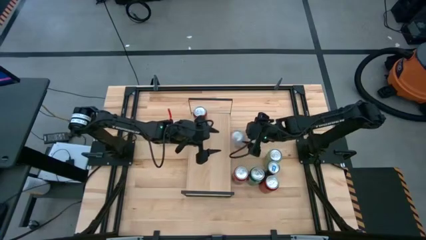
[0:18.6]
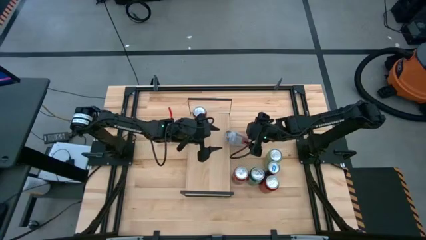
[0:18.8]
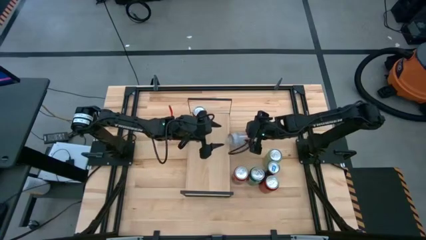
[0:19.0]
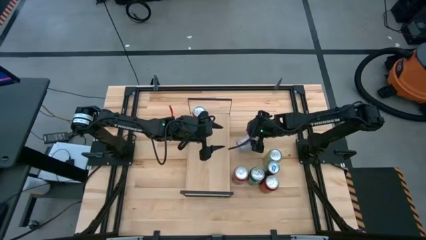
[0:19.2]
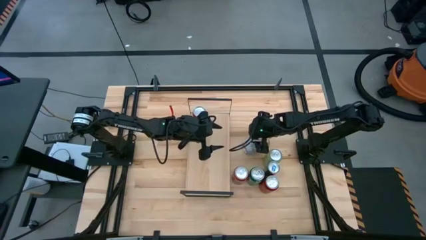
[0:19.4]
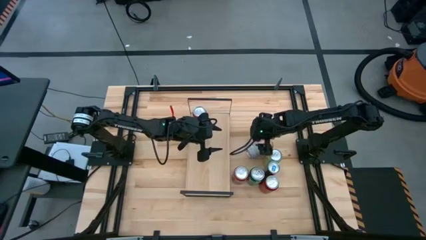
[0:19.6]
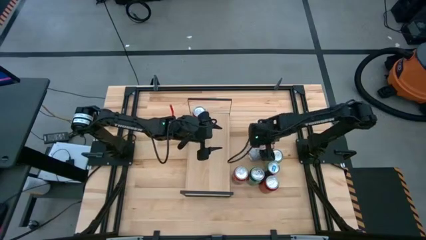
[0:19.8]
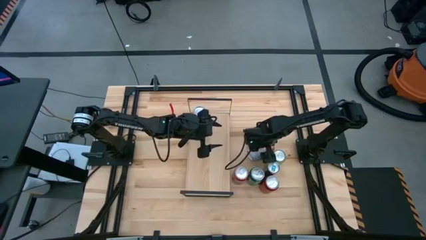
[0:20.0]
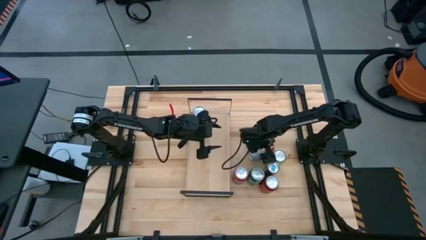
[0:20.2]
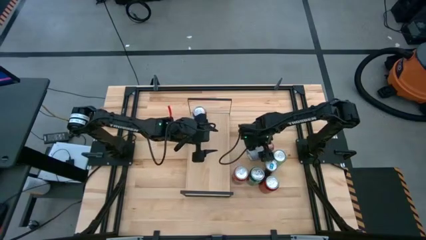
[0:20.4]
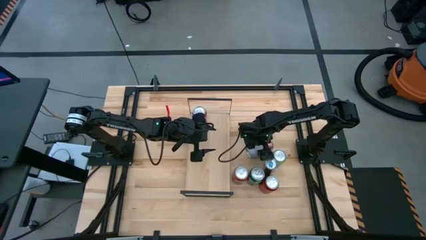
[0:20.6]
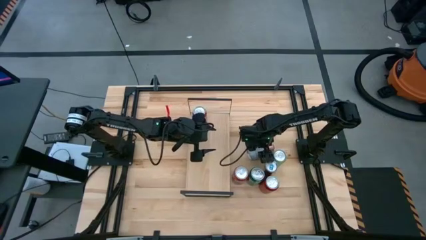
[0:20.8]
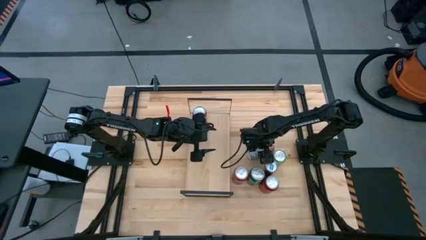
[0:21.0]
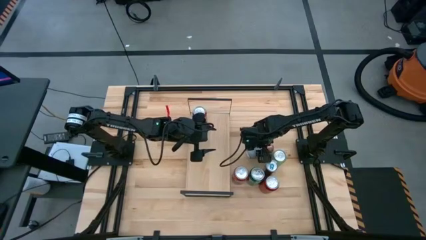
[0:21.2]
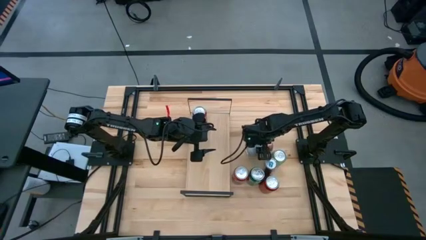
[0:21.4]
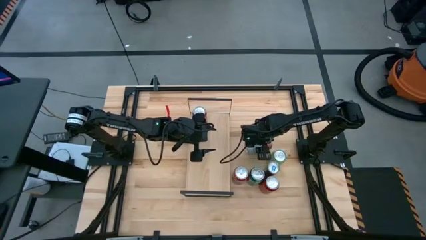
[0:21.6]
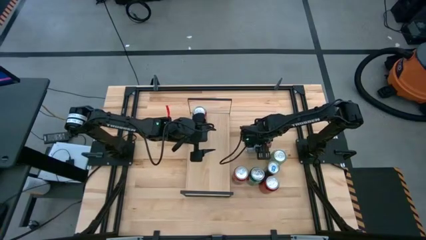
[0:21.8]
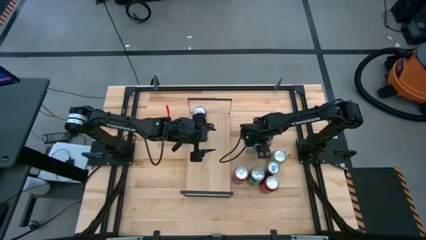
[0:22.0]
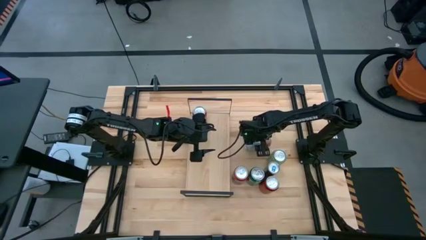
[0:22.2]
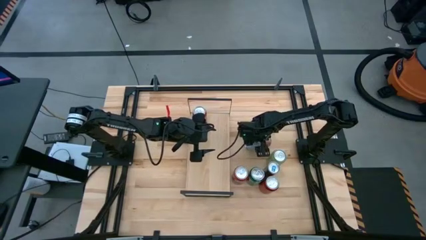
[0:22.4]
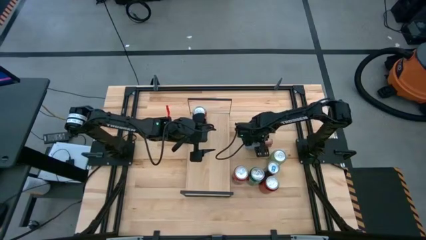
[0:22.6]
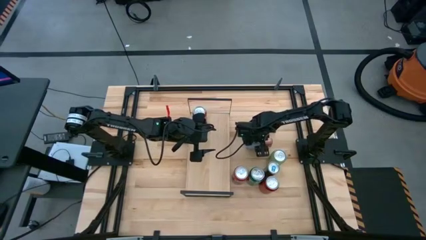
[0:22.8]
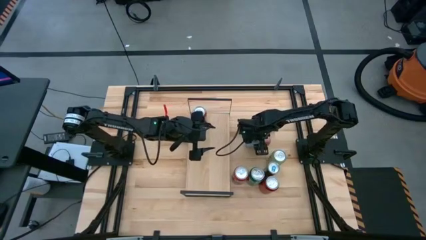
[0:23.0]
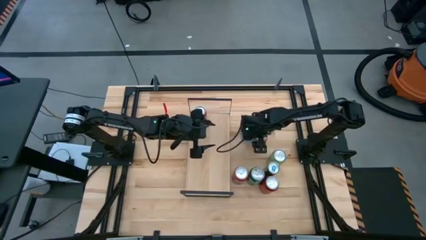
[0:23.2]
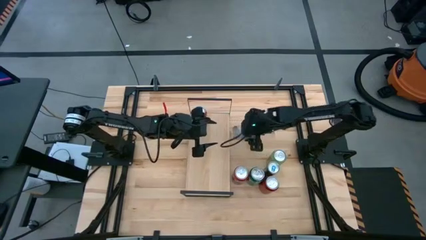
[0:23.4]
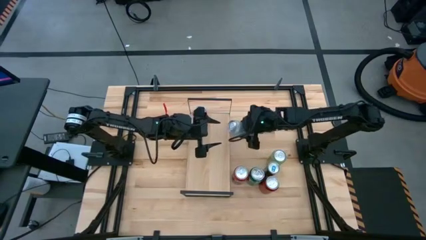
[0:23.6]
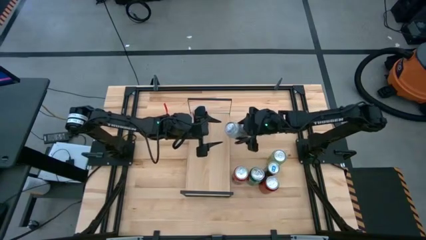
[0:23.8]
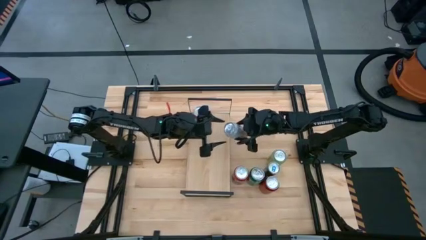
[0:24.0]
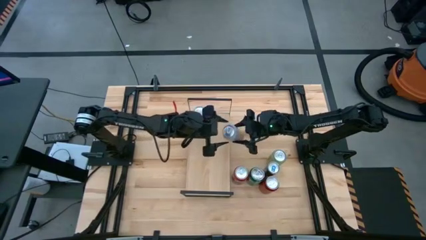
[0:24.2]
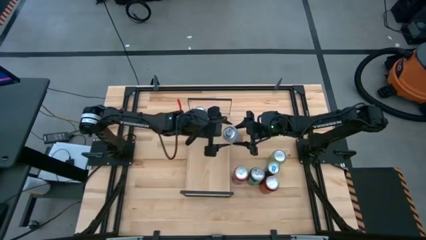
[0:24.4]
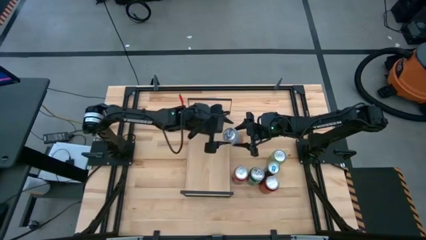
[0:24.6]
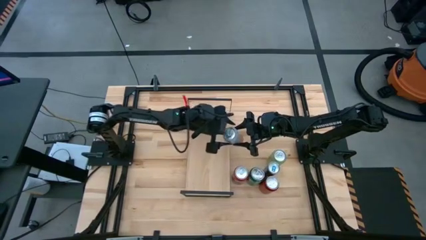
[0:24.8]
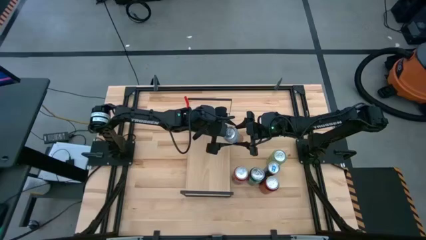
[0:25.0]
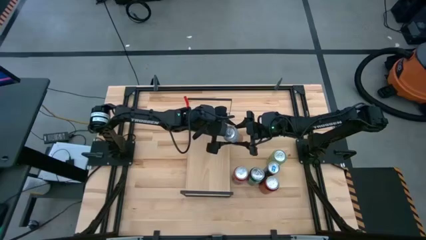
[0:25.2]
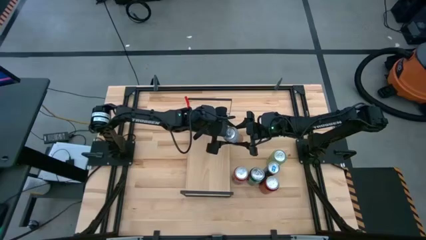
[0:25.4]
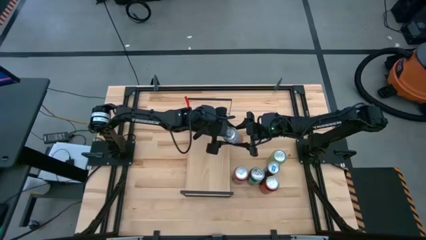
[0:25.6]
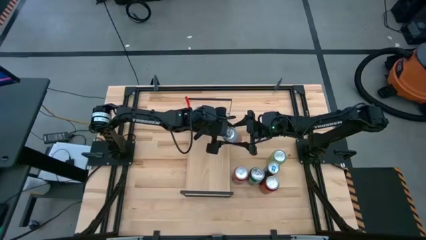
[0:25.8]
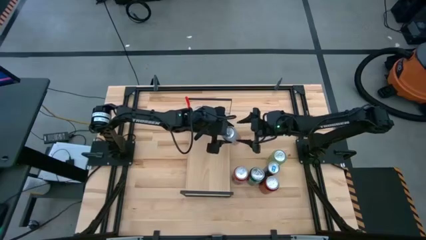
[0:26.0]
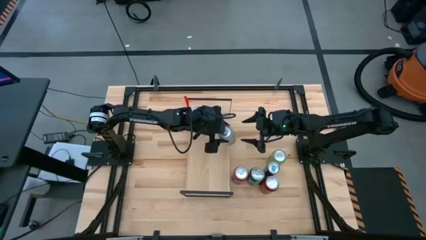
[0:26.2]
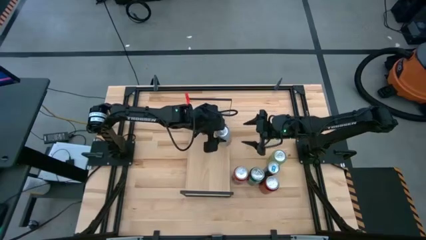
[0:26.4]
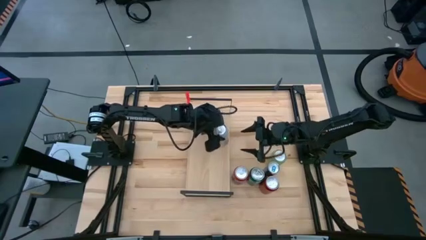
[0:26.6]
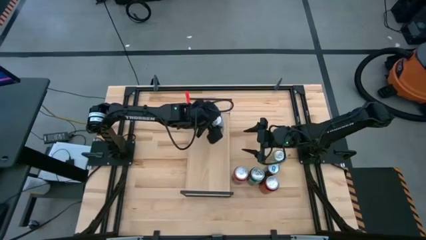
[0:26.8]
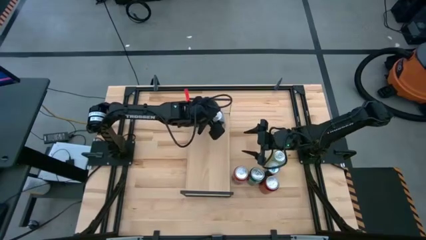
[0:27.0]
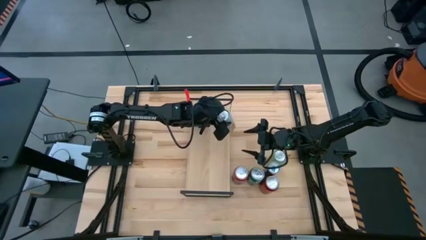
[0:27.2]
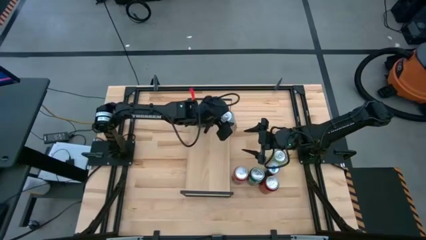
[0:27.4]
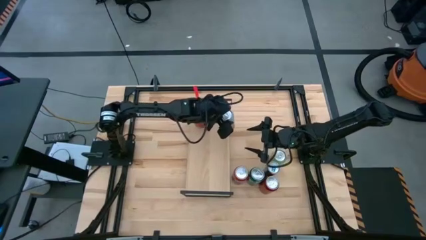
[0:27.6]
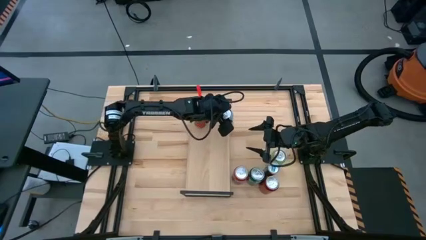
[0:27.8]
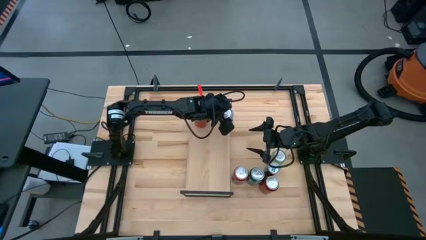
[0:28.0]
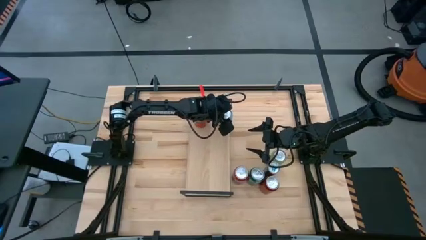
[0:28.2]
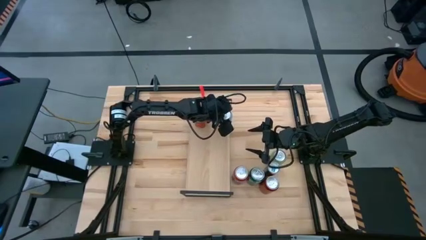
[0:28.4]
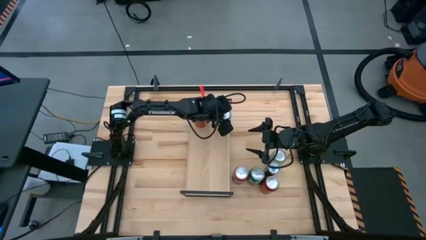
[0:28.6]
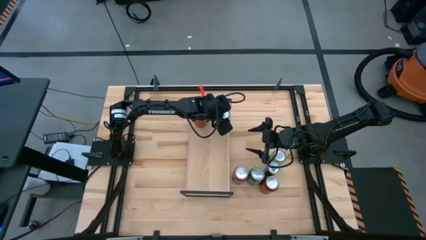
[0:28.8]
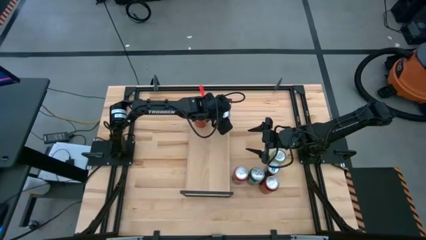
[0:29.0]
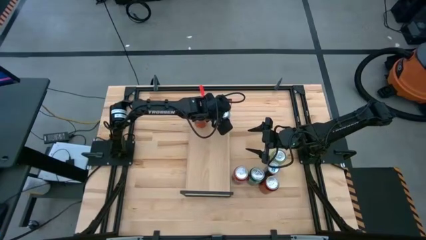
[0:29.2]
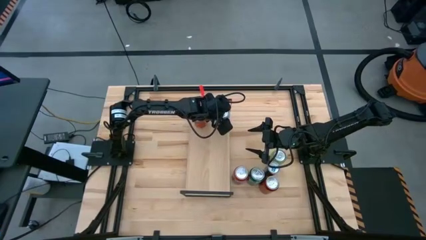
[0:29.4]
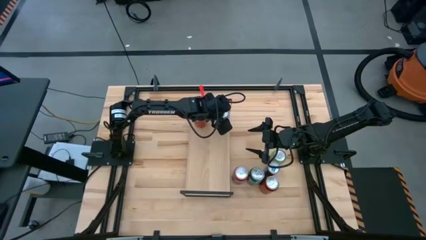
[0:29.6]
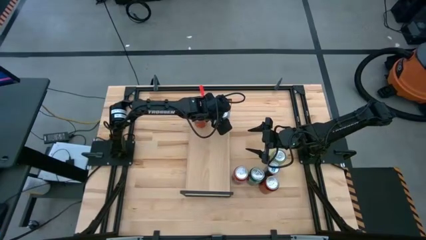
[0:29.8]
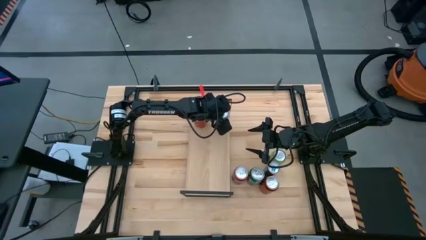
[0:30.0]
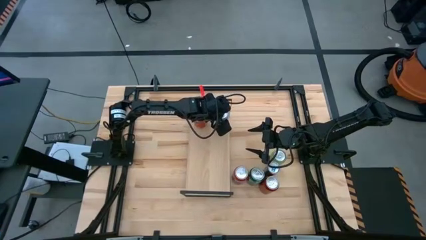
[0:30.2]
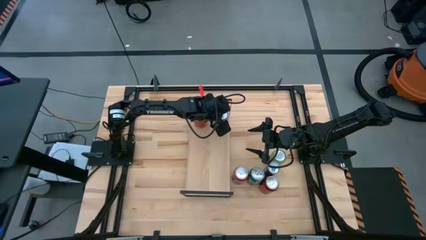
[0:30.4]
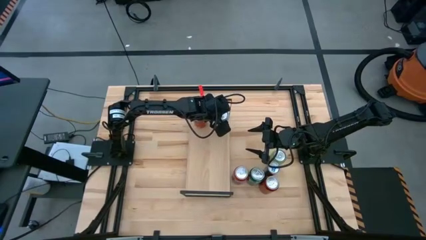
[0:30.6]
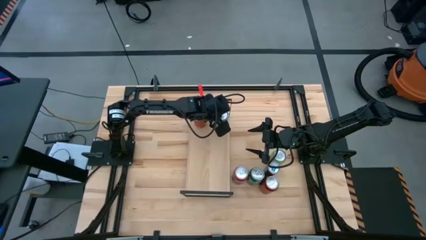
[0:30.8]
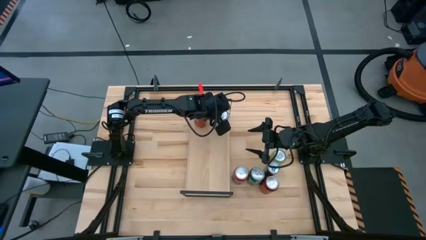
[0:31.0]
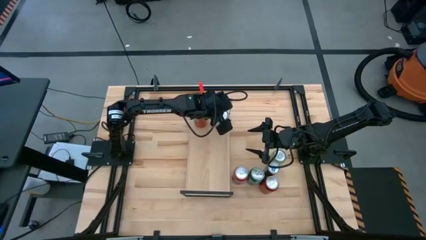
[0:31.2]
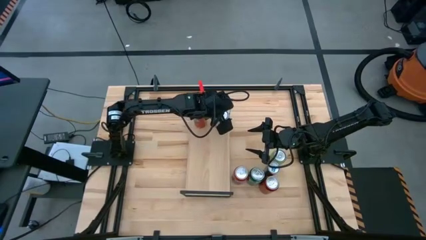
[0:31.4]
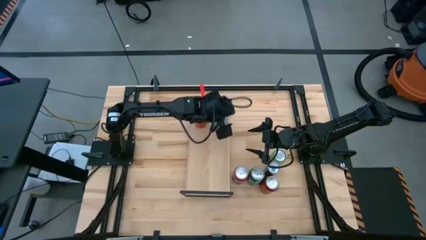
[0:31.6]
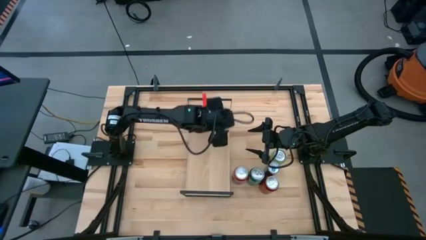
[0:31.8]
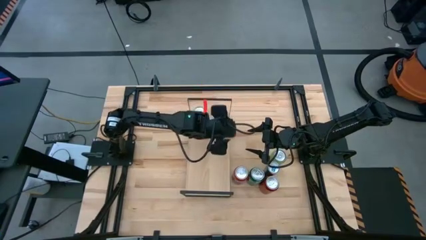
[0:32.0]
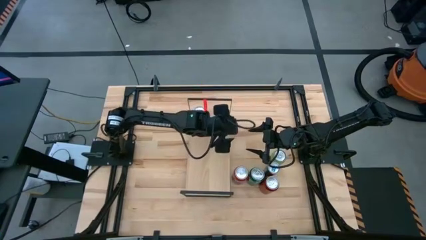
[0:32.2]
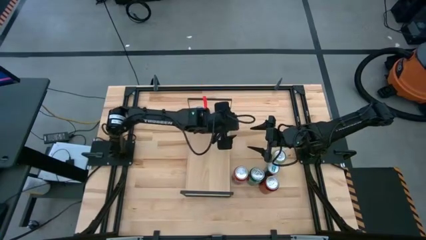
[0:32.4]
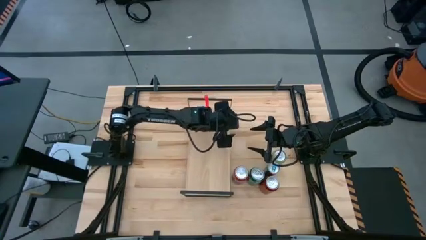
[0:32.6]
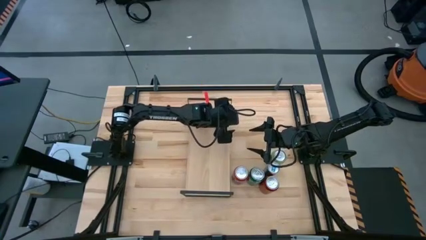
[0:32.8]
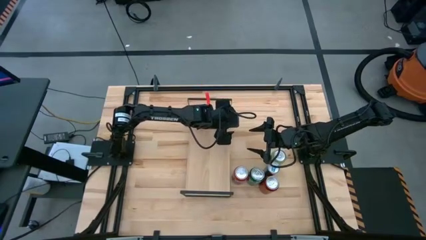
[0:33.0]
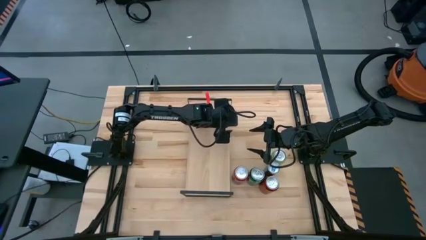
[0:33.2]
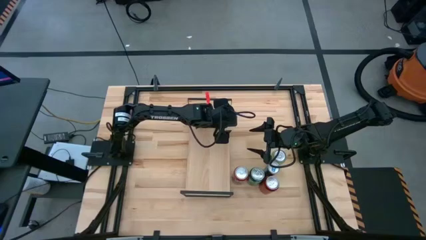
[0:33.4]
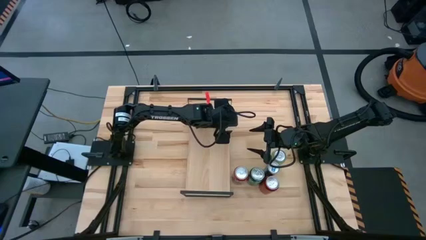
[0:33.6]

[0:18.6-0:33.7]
Task: Place canned beverage on shelf
Put the pink white soda can on the shelf
